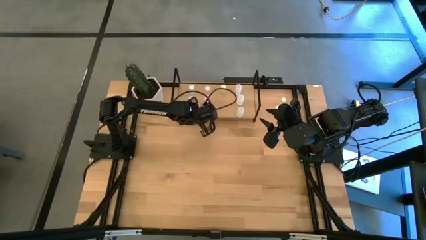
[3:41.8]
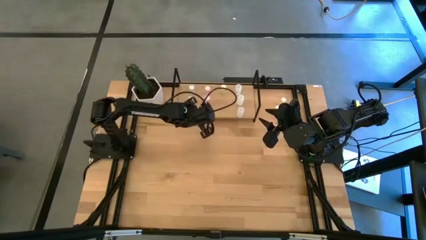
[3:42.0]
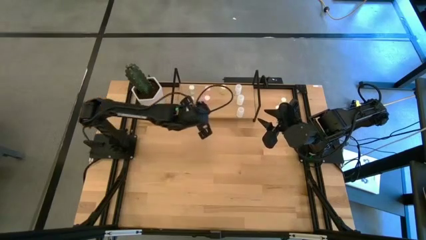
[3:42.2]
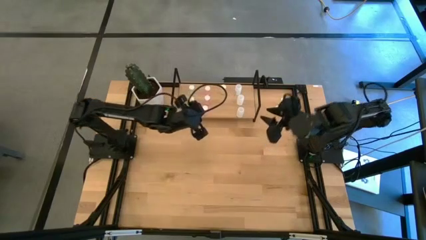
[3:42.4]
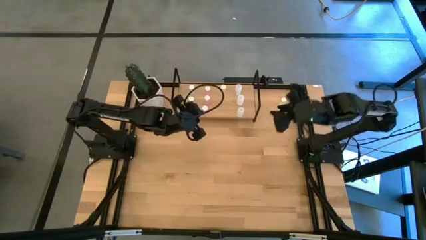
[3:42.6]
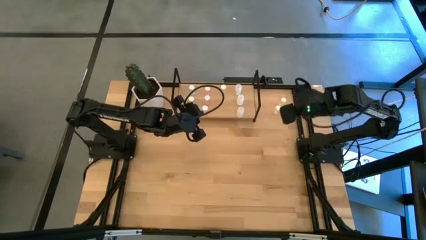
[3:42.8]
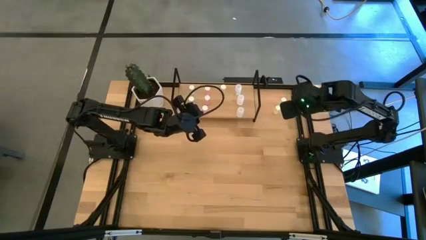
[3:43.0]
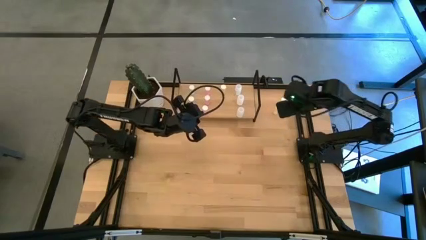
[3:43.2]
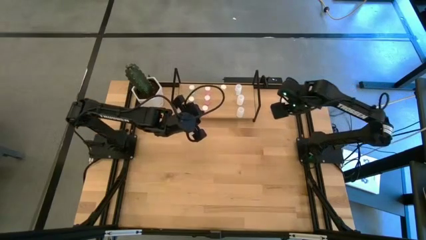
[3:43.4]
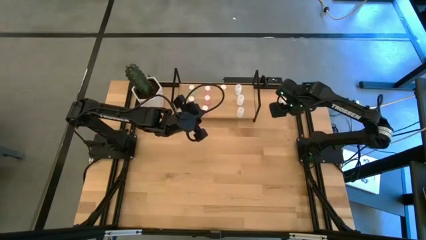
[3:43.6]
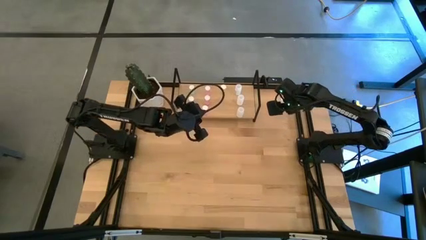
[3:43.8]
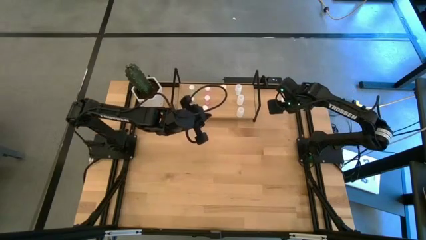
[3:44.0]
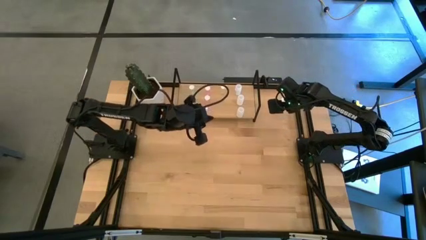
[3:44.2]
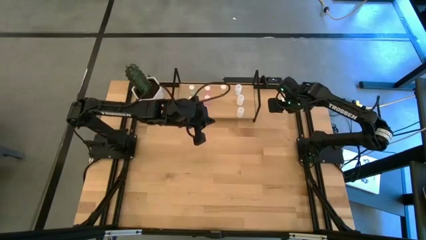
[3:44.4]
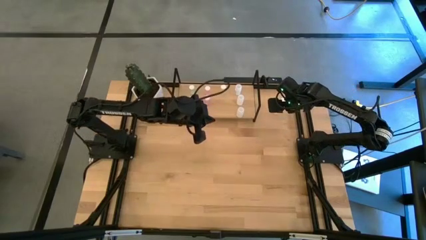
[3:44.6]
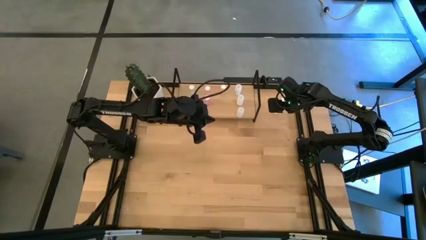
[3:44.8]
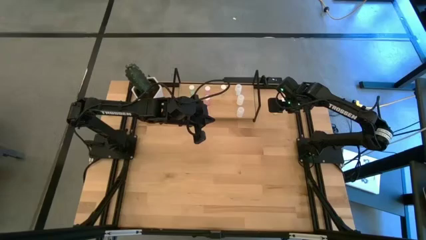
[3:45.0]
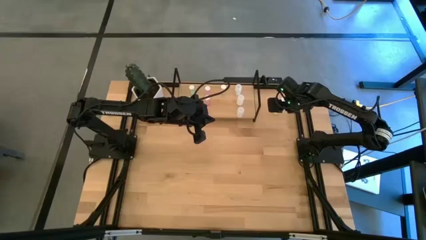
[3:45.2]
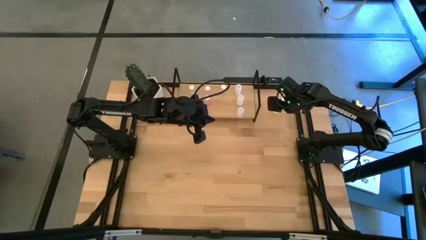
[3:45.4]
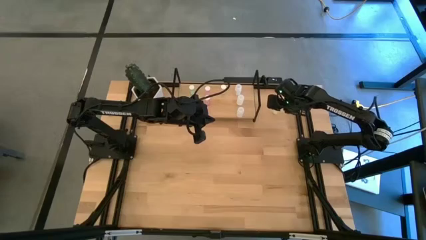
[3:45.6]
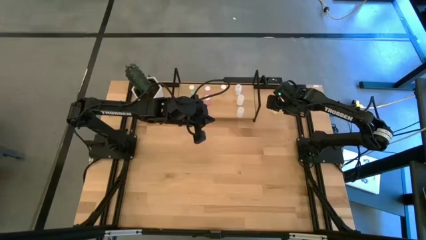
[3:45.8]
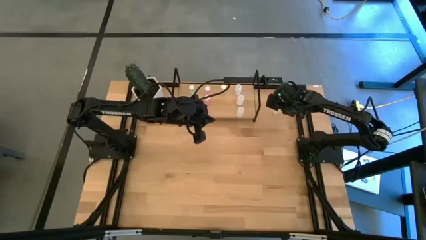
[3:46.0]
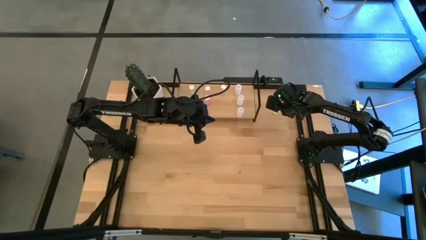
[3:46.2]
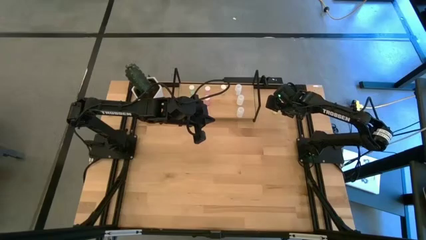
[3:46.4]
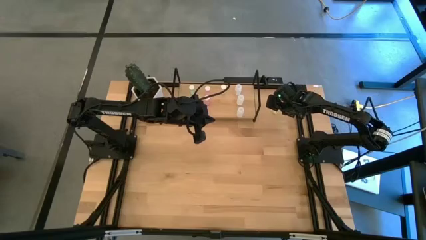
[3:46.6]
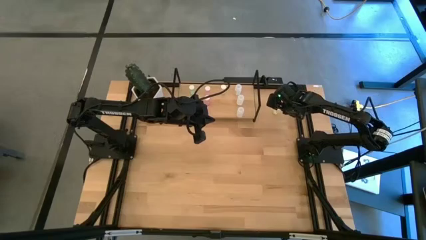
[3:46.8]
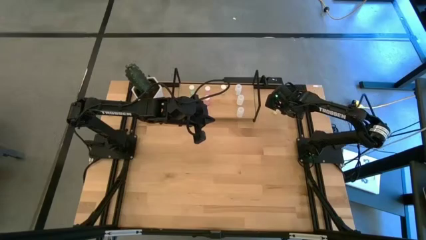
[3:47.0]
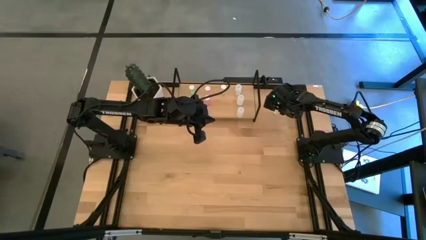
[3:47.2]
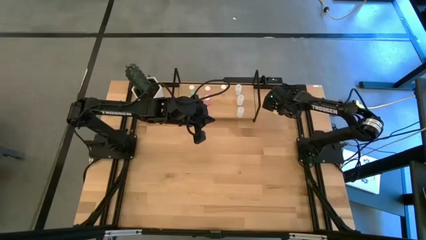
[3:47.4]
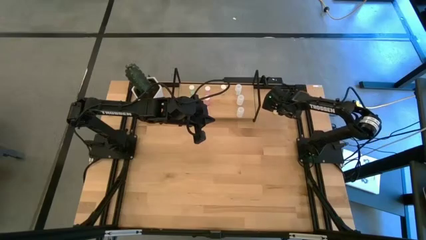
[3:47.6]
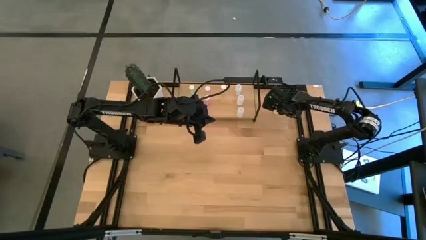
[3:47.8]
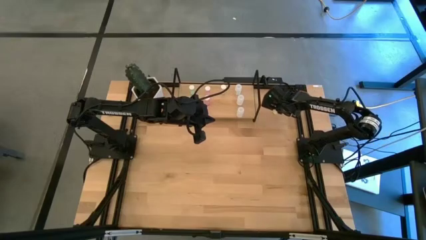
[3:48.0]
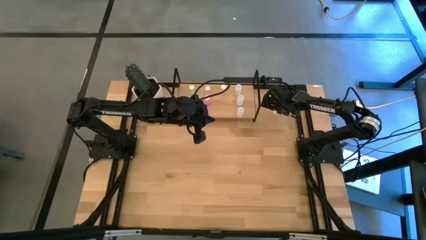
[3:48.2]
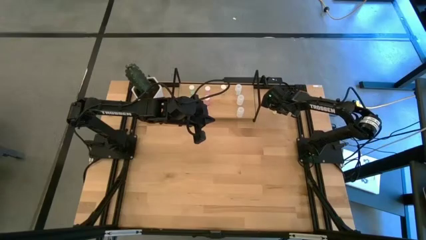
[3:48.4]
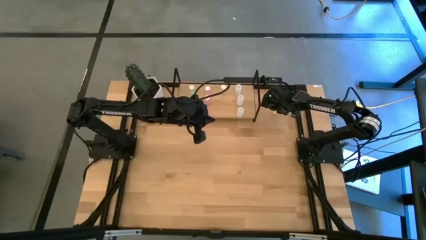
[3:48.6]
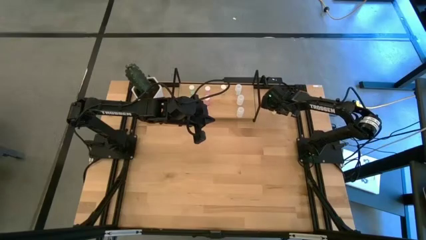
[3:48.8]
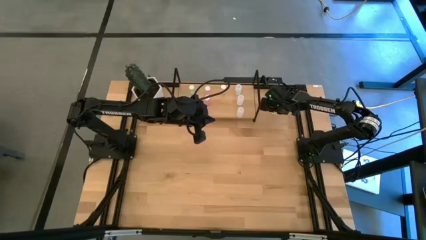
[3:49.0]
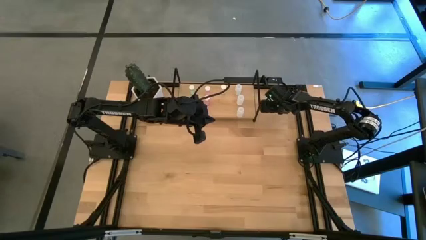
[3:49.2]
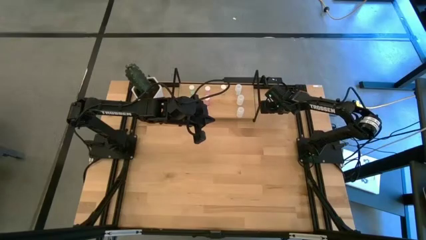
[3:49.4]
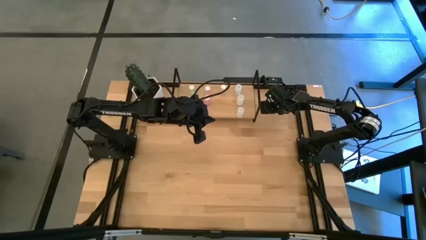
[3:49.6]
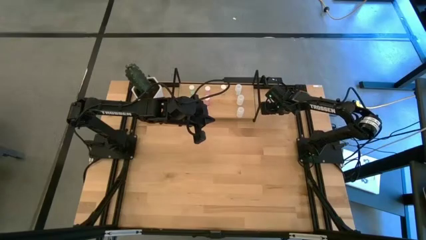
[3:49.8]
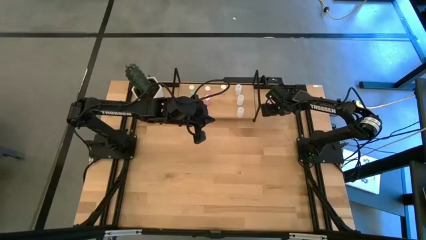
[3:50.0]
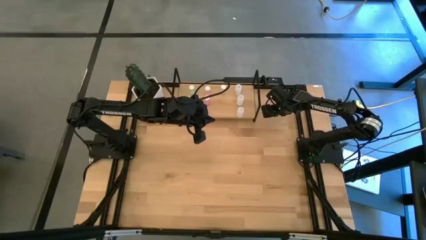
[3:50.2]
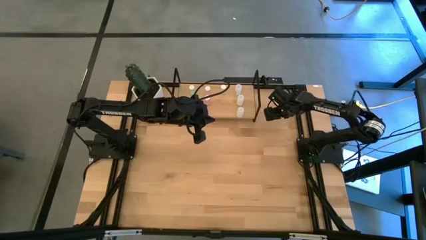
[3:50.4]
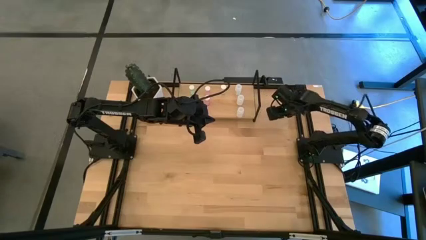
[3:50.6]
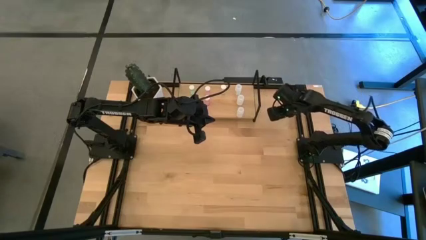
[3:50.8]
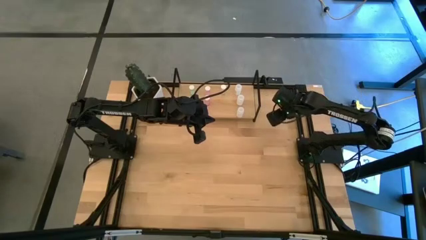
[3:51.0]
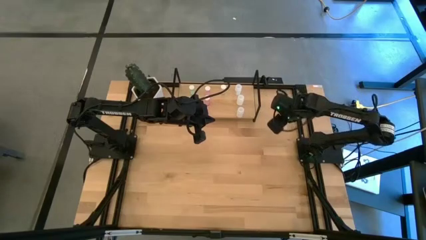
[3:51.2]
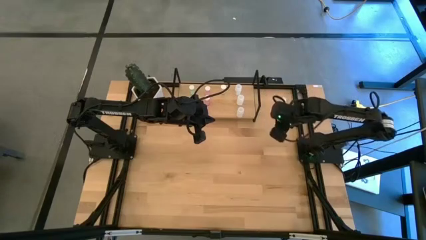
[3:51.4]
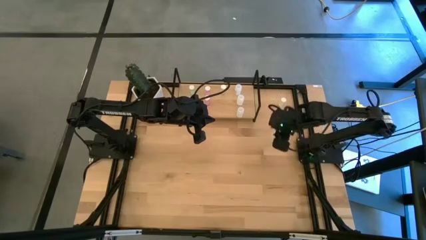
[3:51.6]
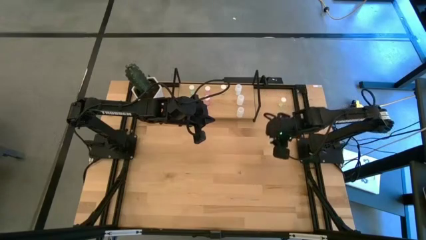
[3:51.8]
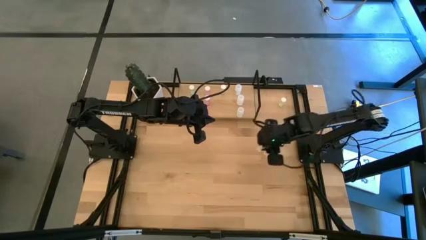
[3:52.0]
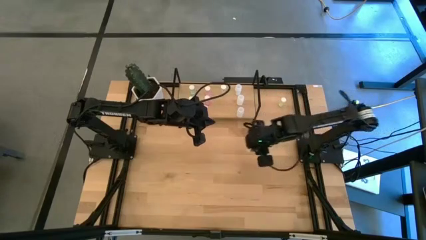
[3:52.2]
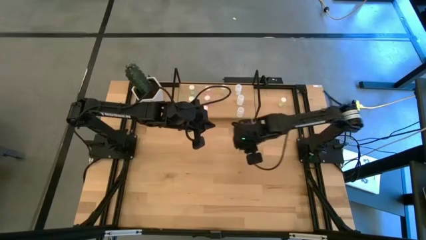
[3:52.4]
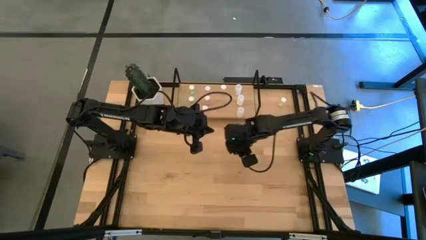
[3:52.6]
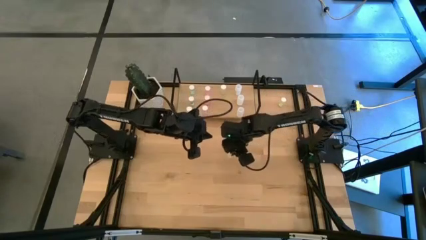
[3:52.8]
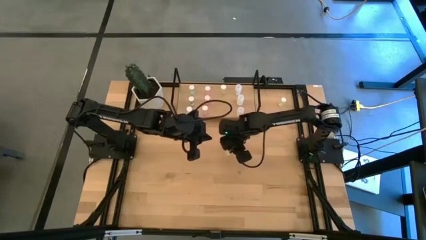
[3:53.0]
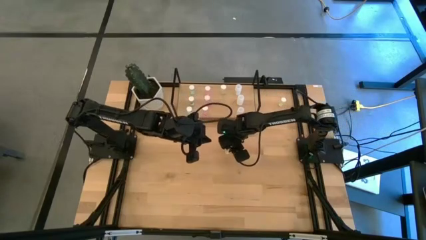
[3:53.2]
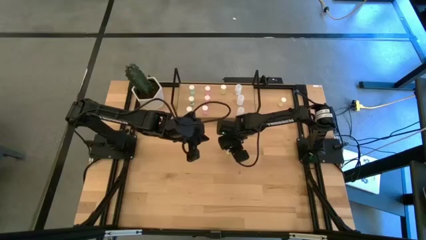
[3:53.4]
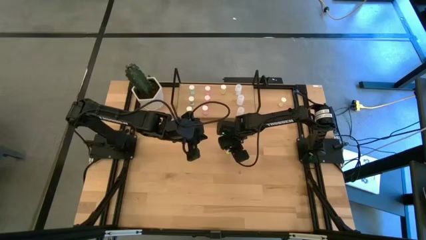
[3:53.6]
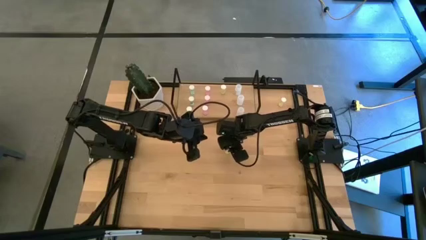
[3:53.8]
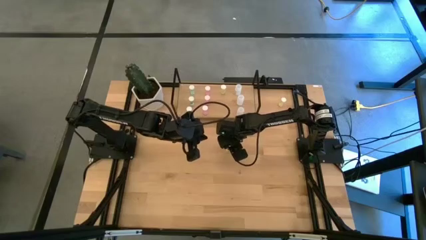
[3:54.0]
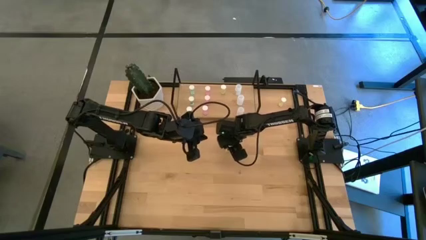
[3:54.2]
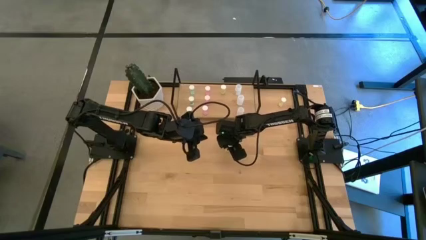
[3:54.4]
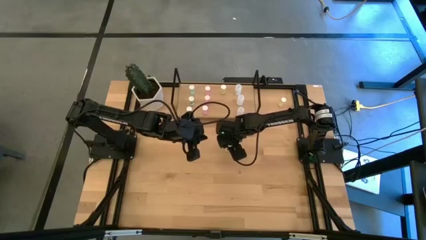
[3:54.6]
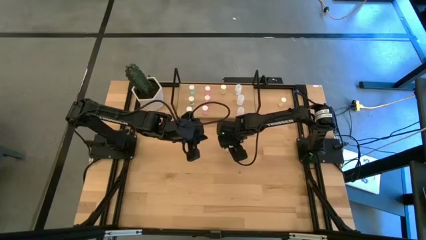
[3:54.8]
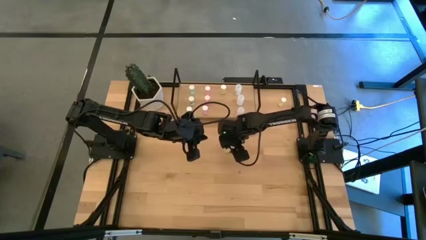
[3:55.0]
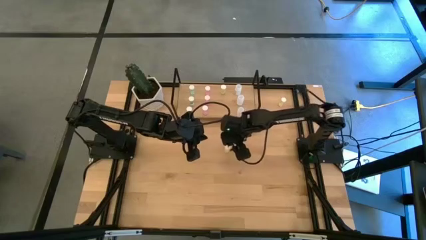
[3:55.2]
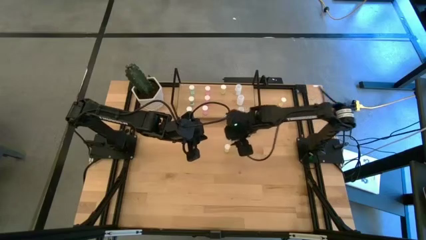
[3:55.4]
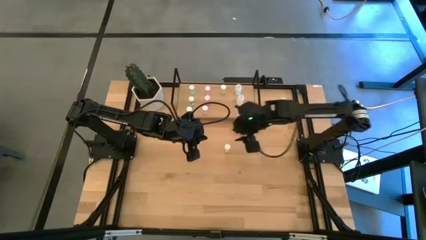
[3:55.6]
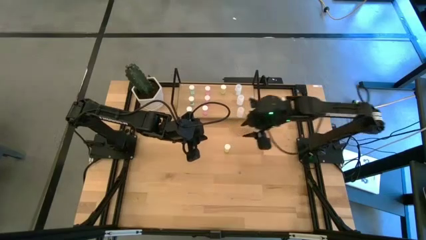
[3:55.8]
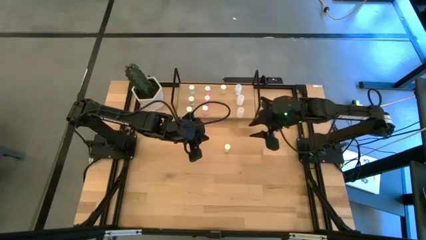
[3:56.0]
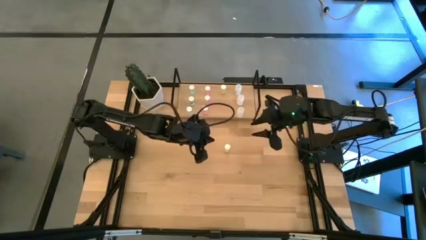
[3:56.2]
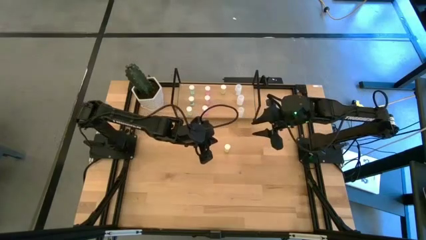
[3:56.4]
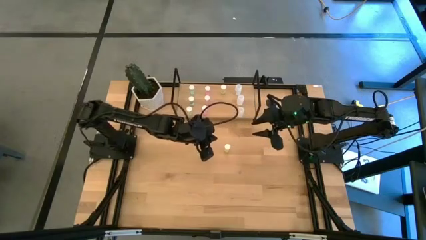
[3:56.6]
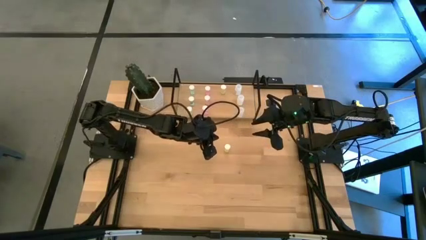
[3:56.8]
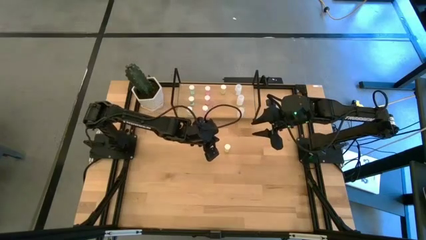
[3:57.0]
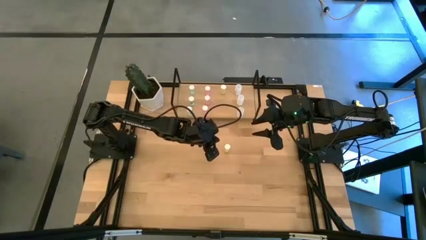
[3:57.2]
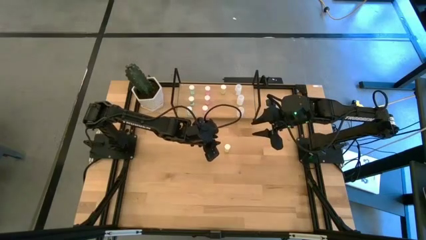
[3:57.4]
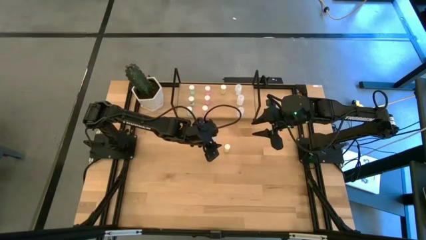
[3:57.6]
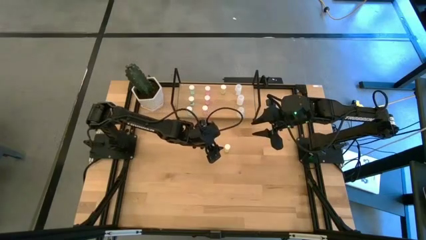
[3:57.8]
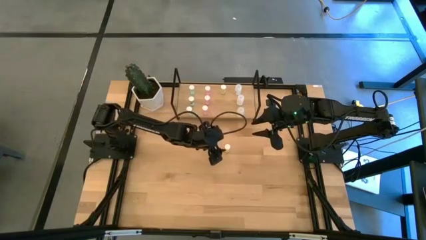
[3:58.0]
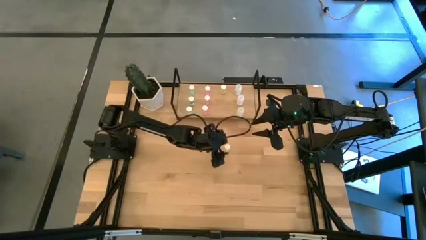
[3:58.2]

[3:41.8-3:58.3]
Task: Pick and place medicine bottles onto shelf by color
Put the bottom yellow pill bottle on the shelf aligned with the other yellow pill bottle
